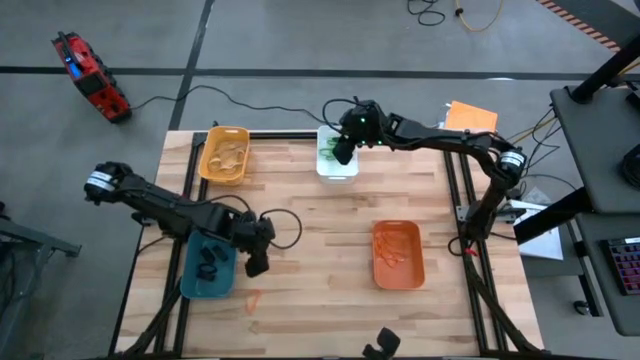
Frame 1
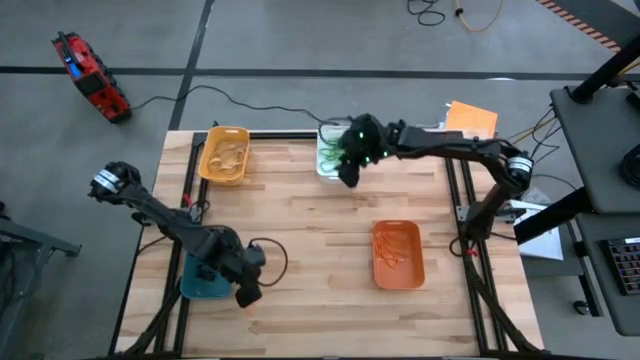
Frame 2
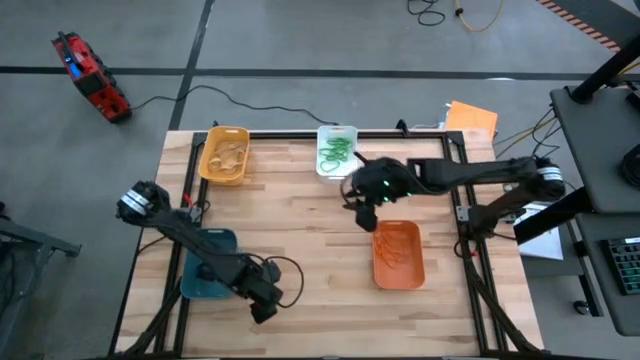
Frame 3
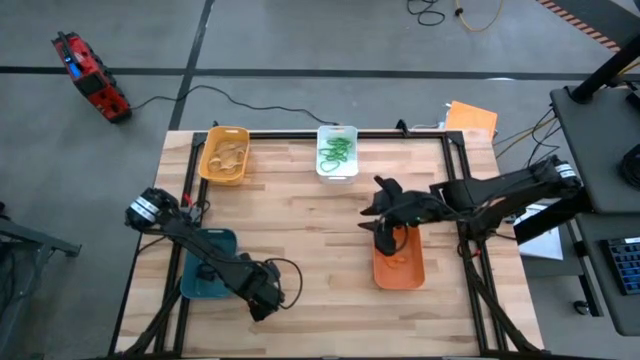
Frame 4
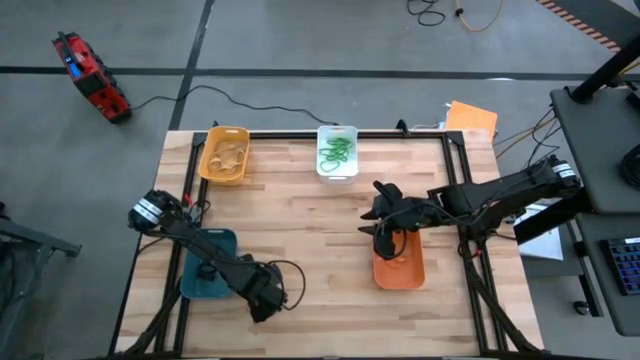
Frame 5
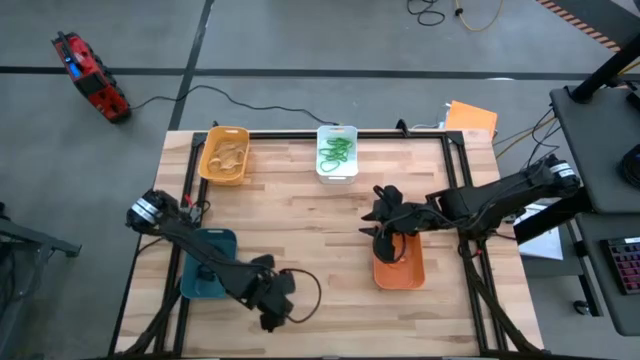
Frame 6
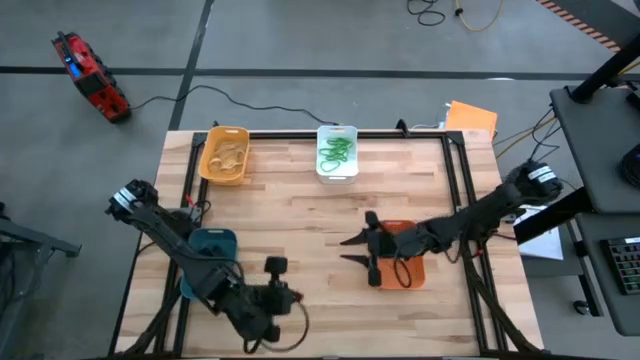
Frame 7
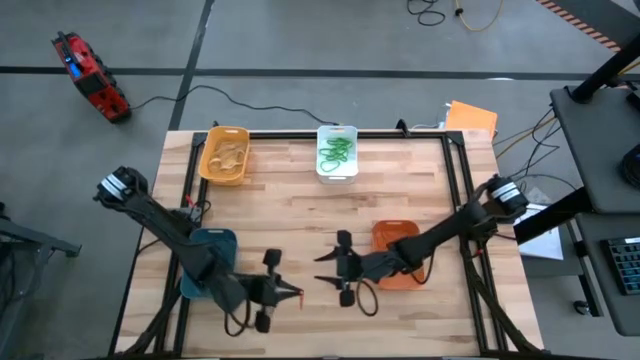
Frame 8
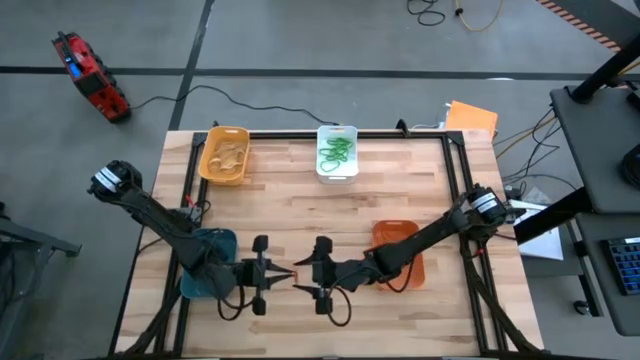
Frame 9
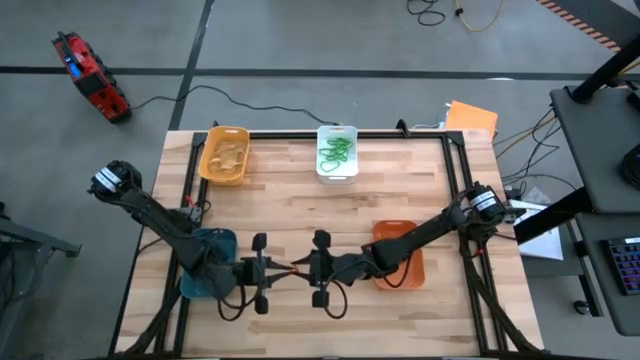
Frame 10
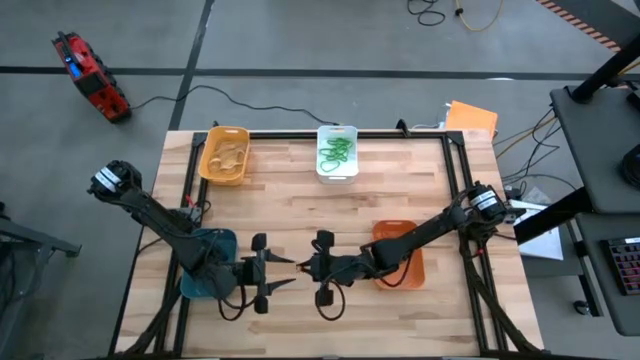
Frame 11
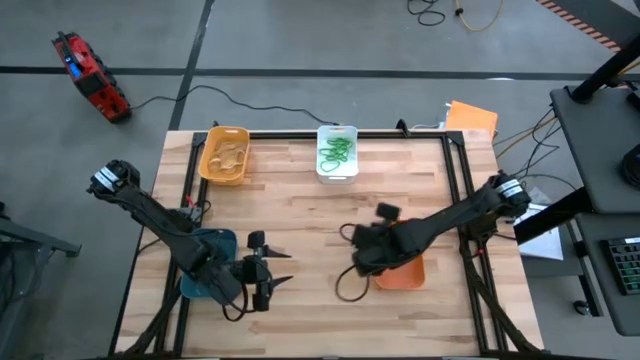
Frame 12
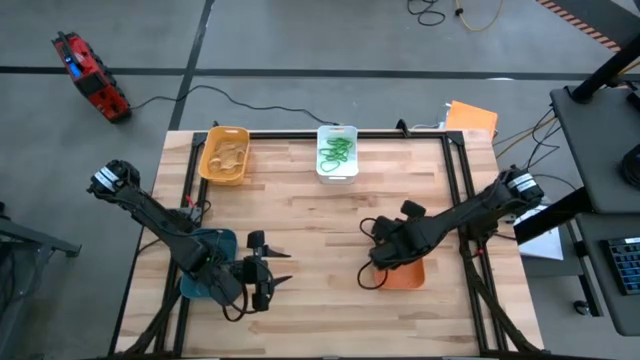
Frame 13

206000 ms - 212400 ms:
Task: Sort rubber bands into baskets
Put the orange rubber band into the orange bin

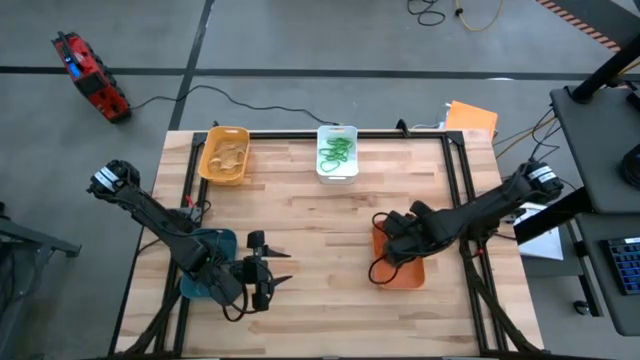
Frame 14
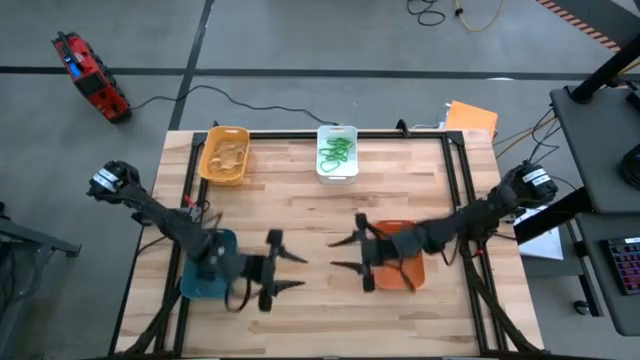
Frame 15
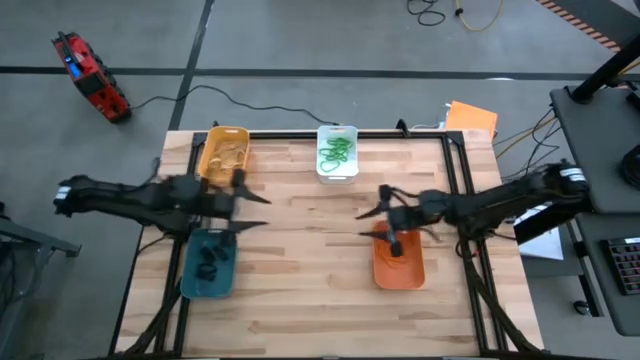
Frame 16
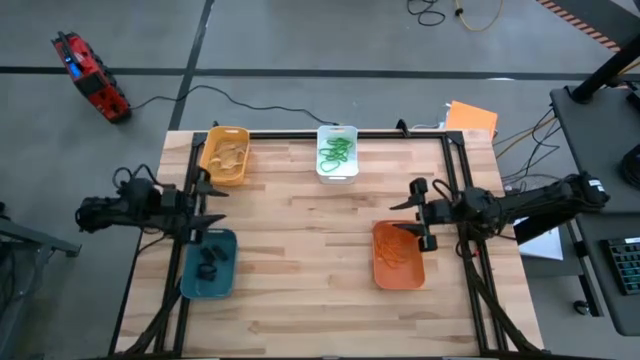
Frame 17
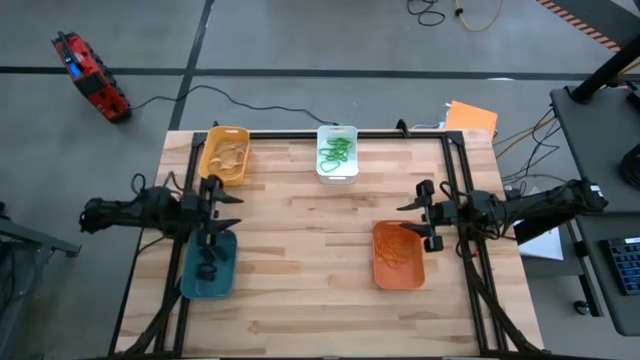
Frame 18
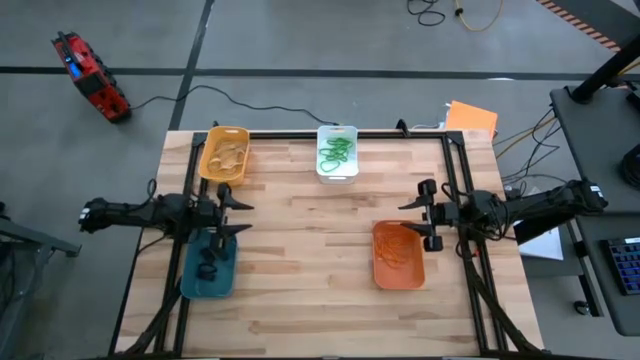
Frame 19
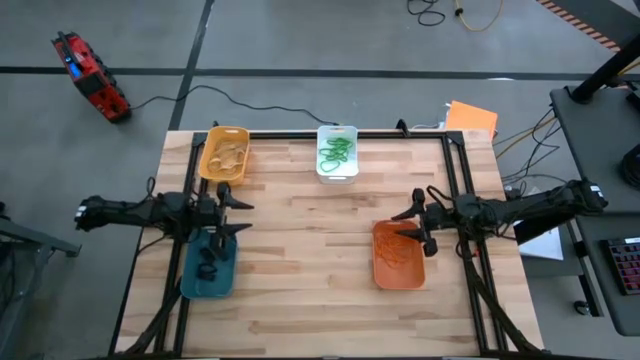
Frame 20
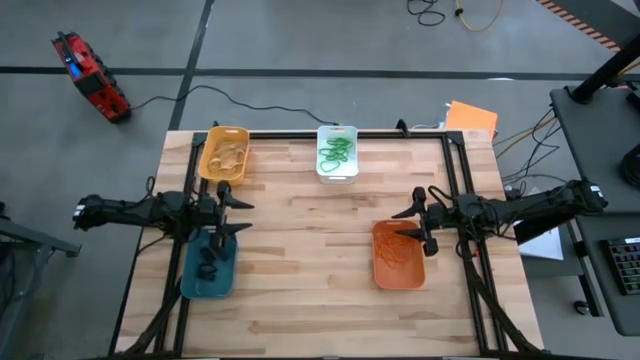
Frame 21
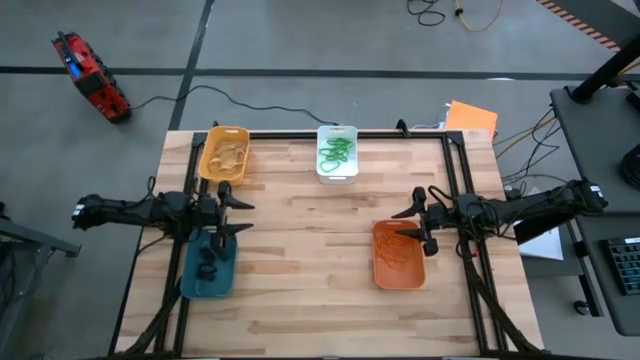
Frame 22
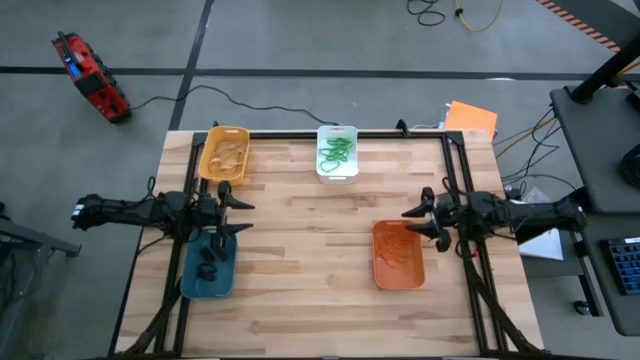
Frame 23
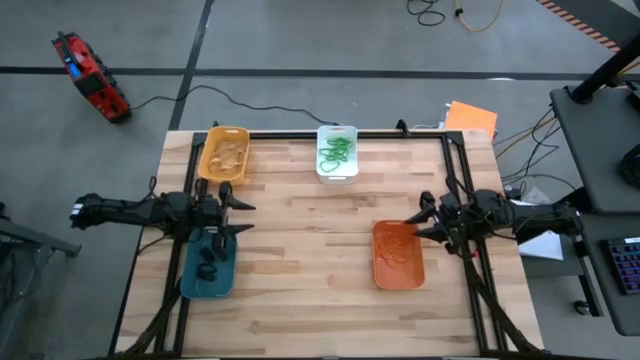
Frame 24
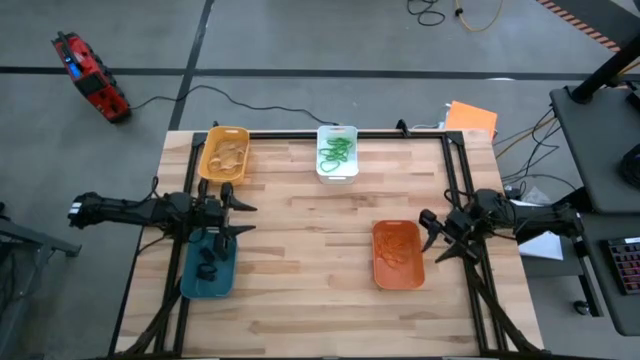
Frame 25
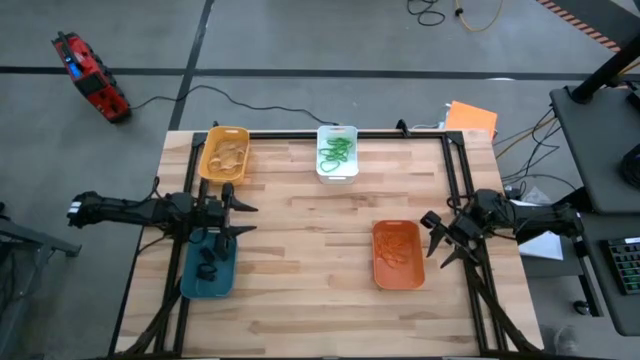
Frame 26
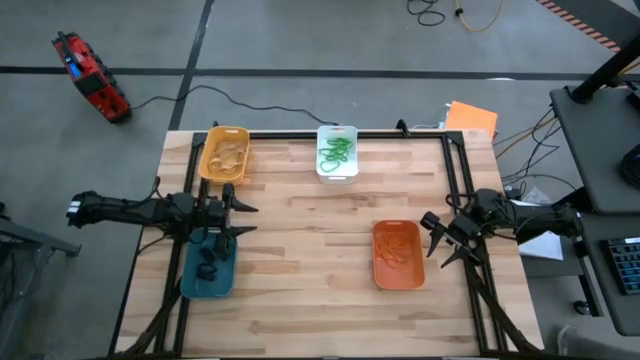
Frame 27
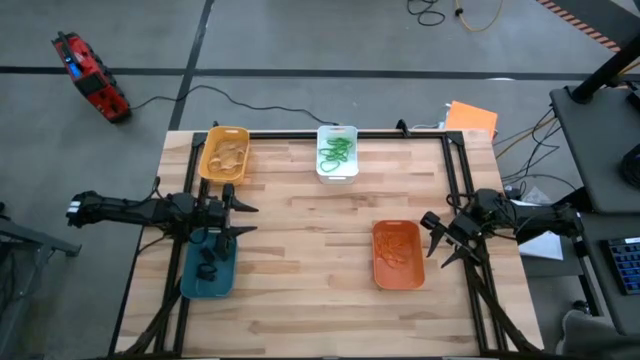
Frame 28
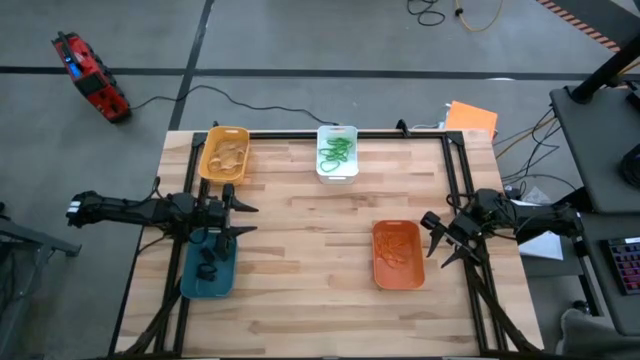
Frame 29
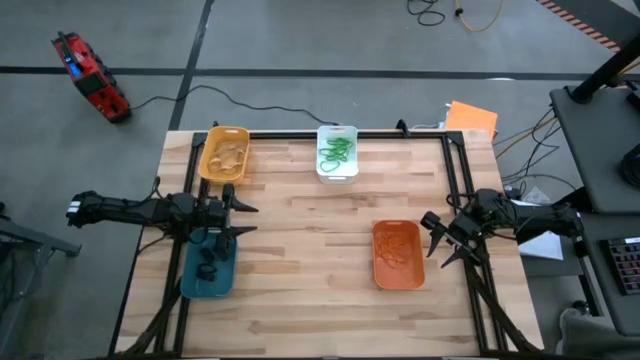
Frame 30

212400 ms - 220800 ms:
Return to Home Position

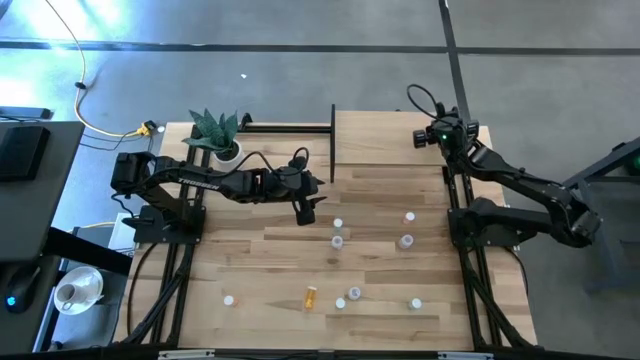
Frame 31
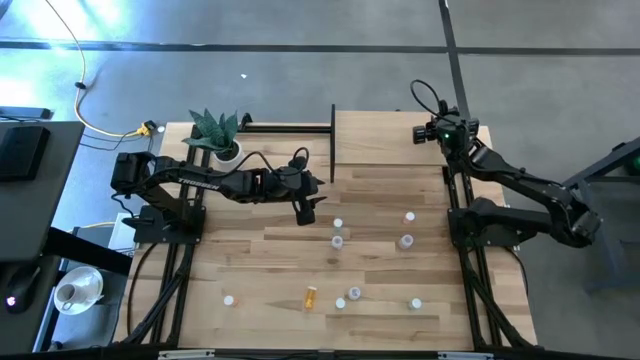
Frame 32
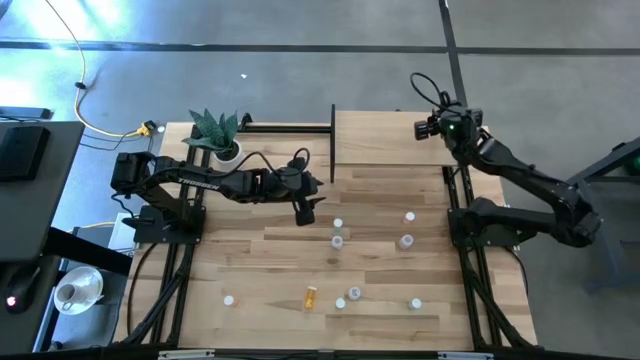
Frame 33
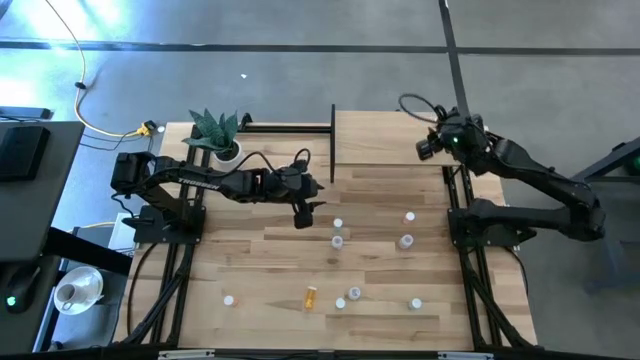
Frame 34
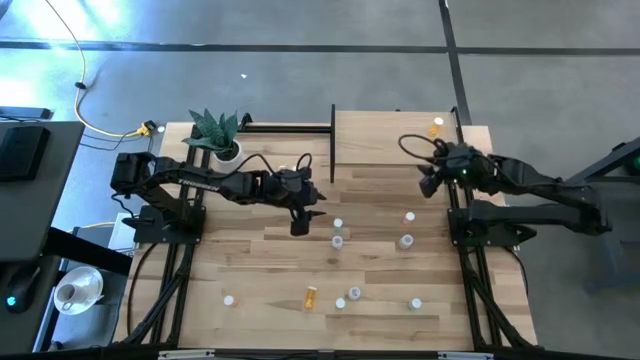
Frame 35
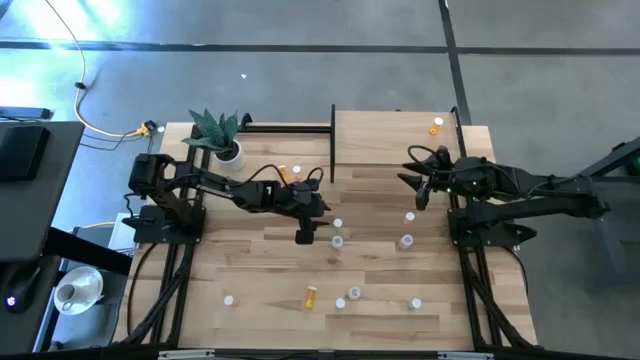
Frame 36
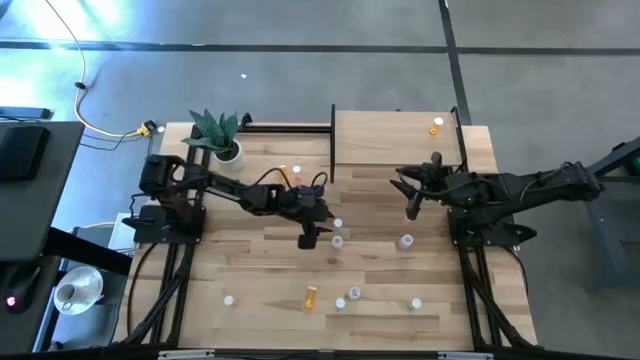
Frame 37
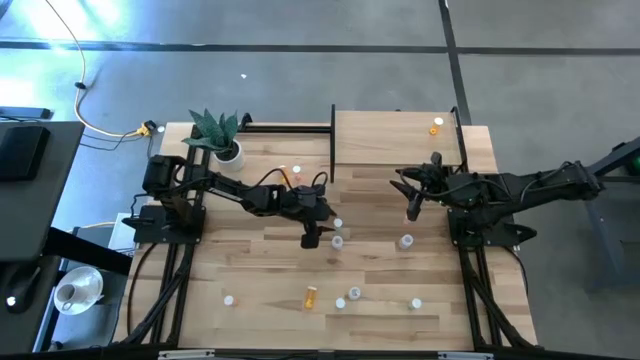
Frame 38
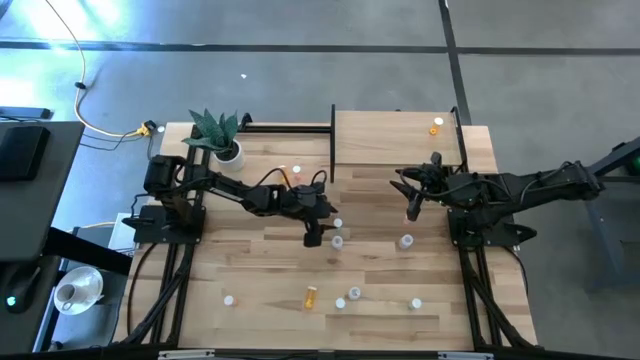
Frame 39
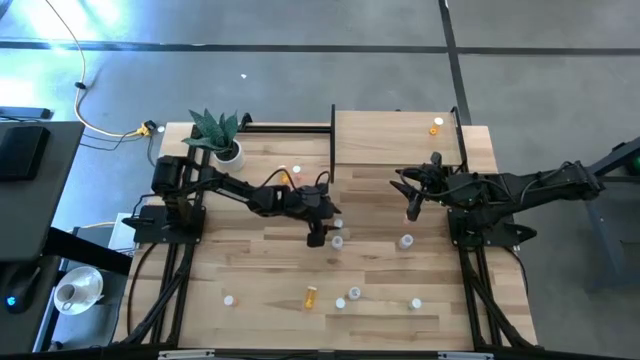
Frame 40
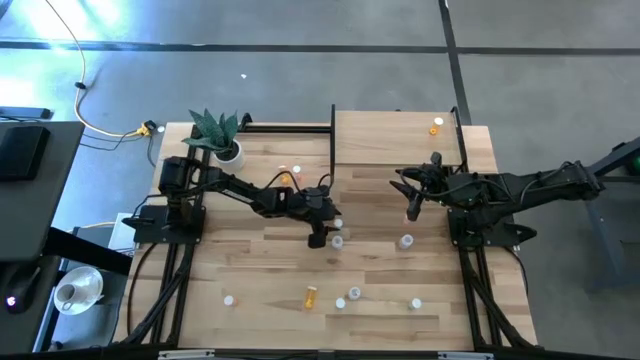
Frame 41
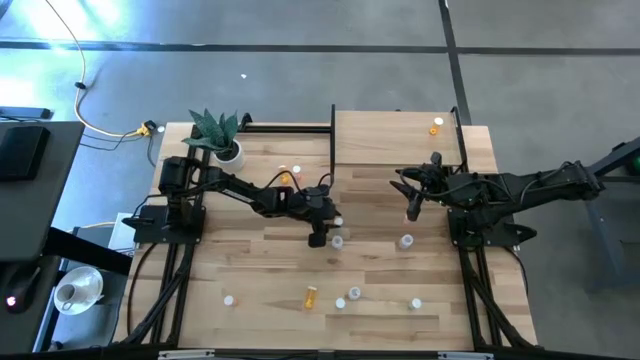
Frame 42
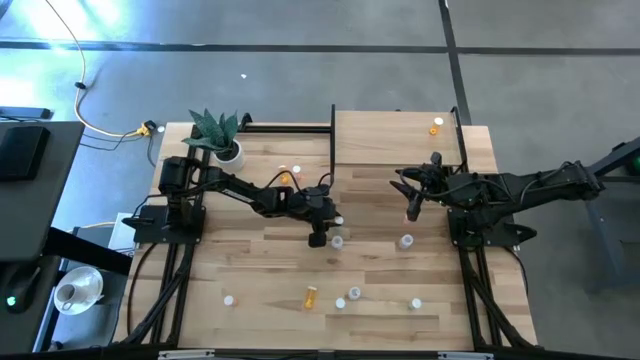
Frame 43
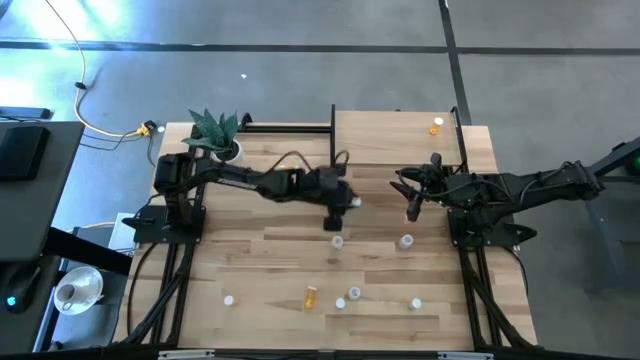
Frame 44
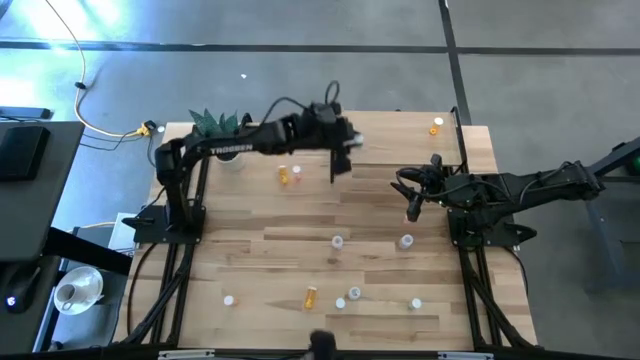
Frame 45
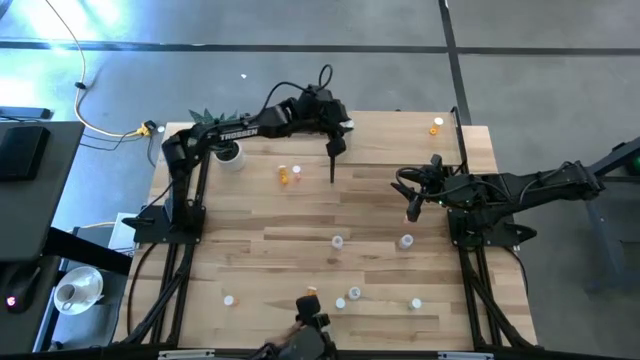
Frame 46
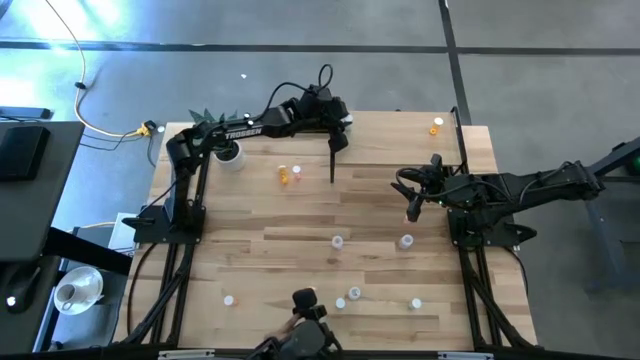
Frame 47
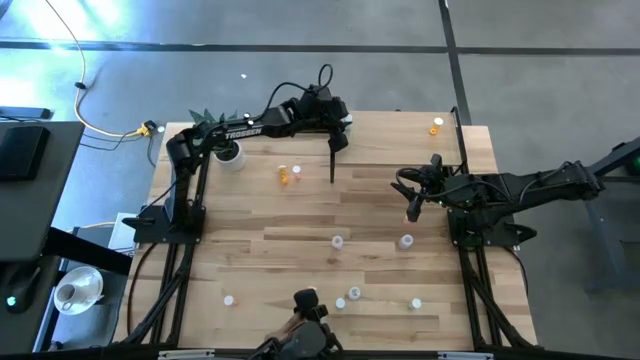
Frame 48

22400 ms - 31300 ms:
Task: Pick and place medicine bottles onto shelf by color
Put the top left green pill bottle on the shelf
